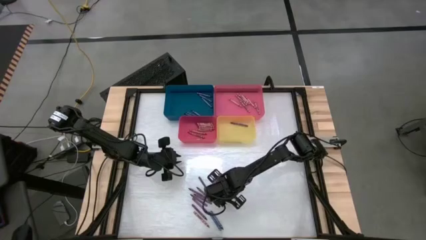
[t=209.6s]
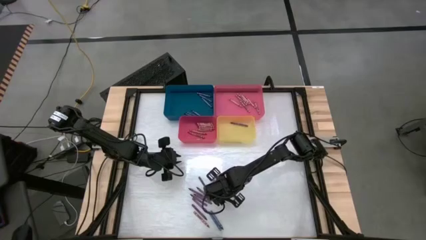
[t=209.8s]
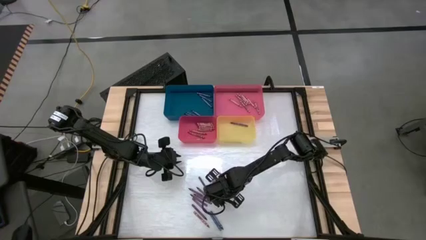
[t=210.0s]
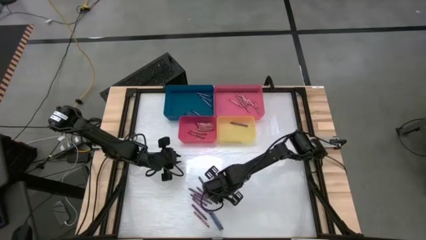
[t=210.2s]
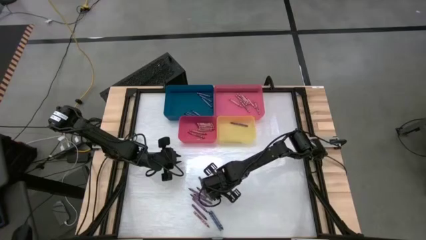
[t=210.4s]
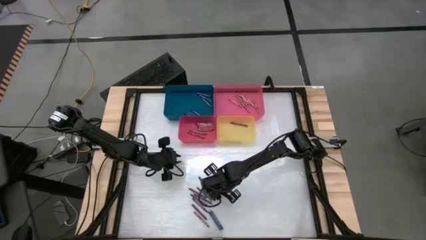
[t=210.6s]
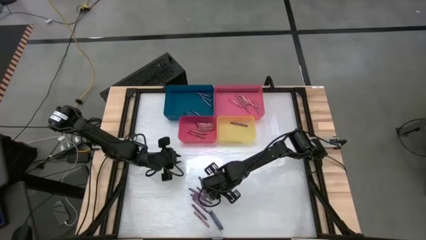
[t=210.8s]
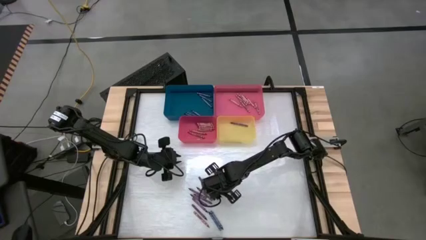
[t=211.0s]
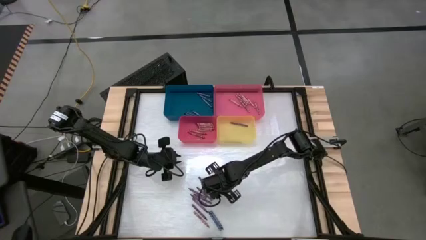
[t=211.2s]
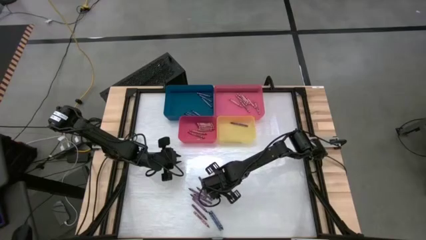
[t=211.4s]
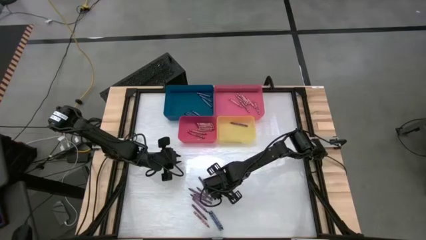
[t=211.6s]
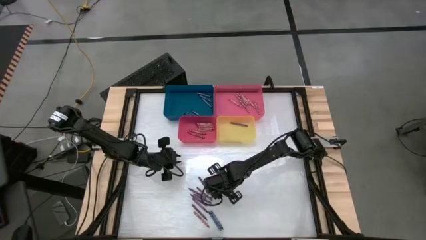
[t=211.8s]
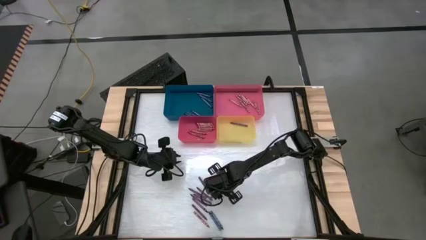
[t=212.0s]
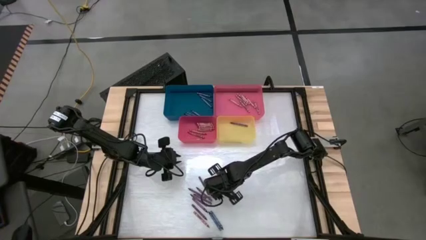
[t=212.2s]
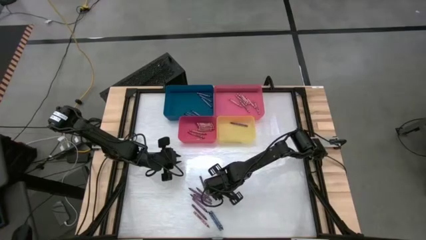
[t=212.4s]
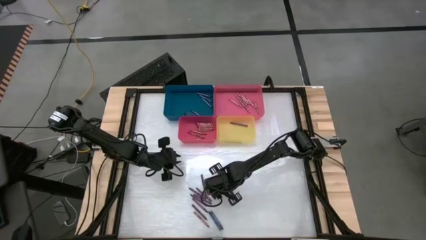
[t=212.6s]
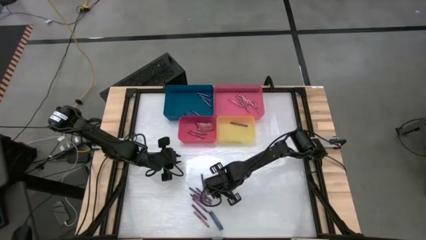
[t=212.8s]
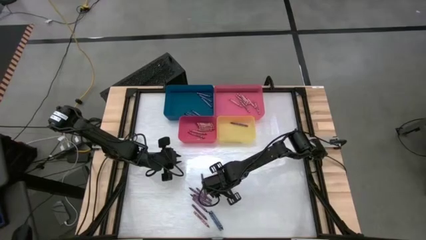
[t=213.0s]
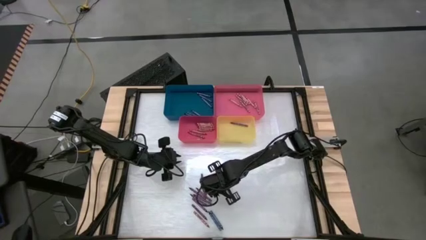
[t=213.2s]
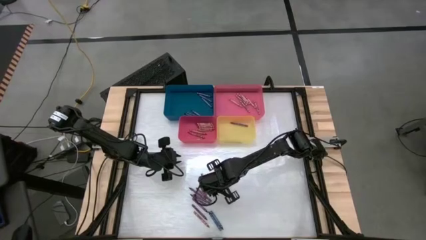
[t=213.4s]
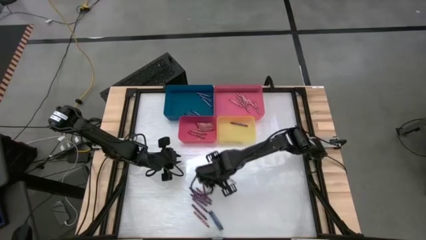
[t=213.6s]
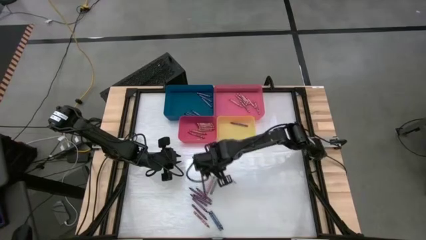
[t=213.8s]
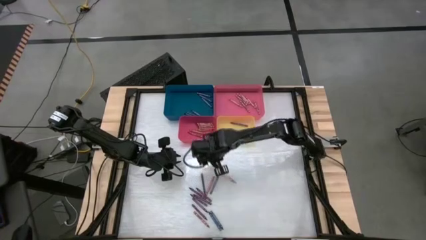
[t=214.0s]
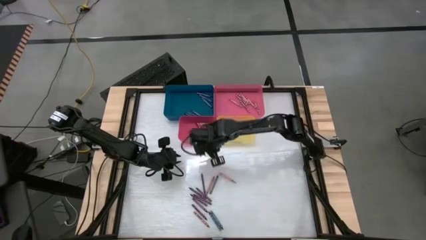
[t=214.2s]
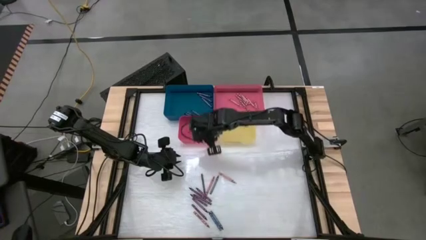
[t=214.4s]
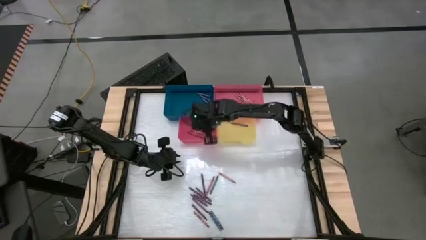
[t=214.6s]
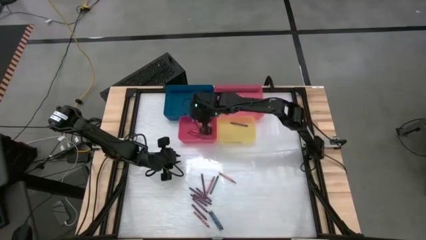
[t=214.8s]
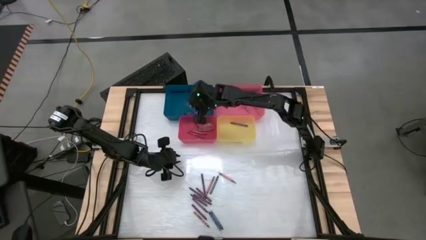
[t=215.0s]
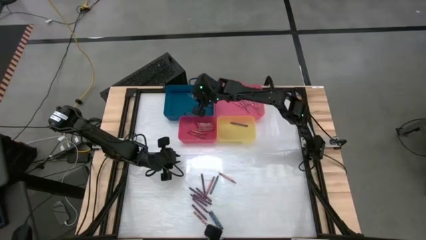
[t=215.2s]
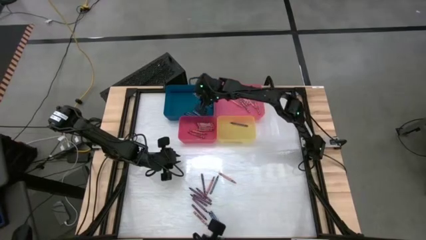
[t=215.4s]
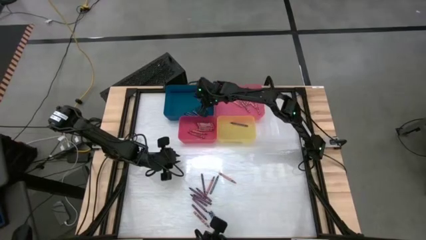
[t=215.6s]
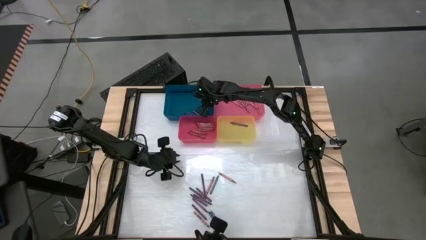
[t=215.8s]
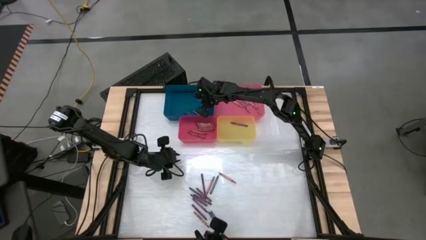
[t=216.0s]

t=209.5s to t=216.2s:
Task: Sort crayons
Put the blue crayon into the blue bin

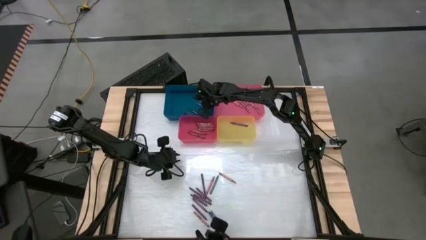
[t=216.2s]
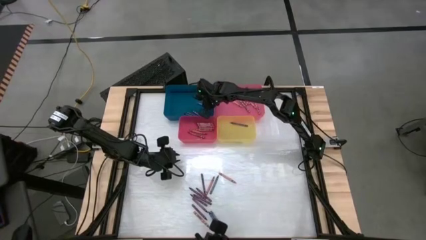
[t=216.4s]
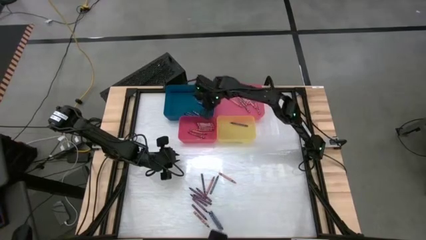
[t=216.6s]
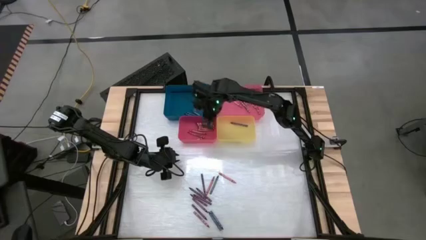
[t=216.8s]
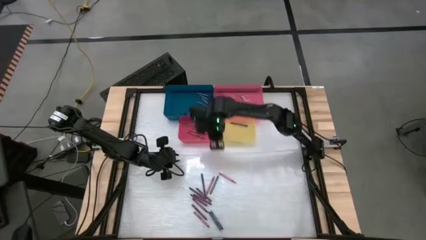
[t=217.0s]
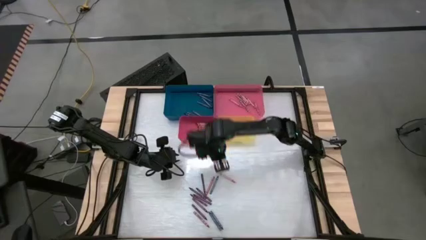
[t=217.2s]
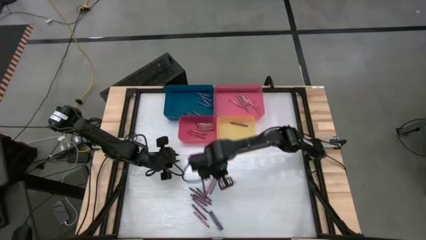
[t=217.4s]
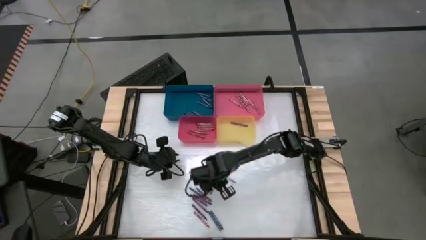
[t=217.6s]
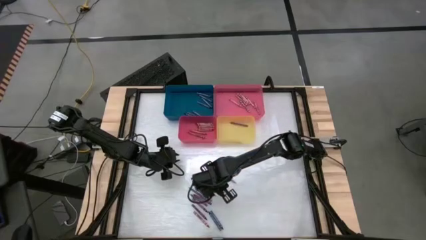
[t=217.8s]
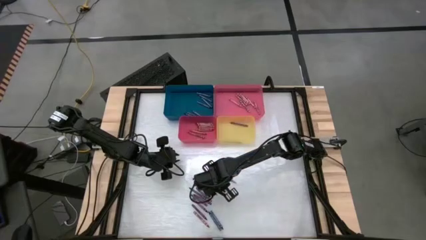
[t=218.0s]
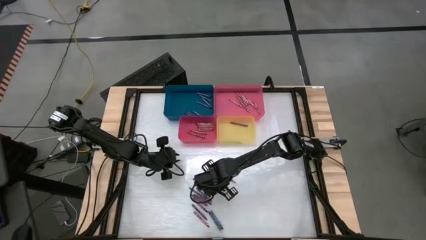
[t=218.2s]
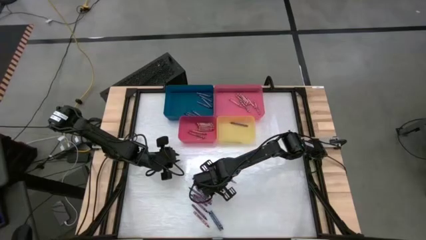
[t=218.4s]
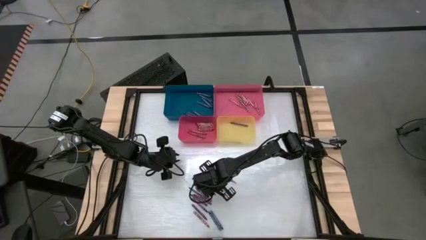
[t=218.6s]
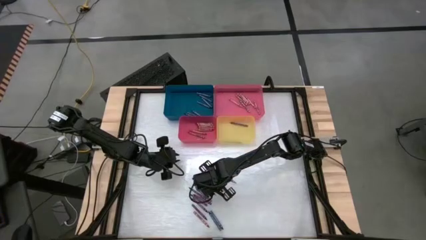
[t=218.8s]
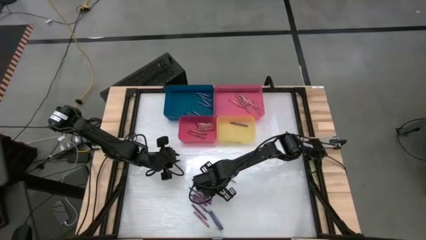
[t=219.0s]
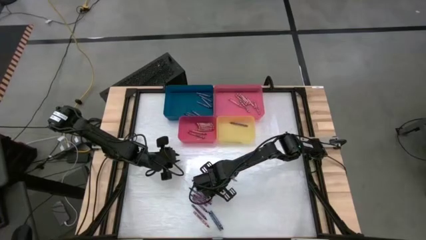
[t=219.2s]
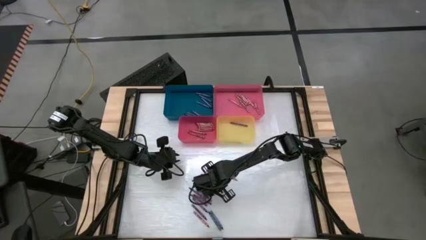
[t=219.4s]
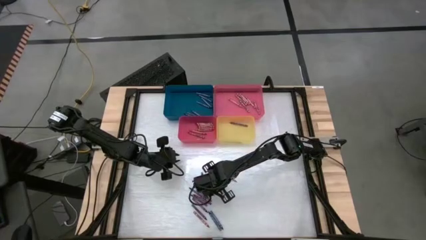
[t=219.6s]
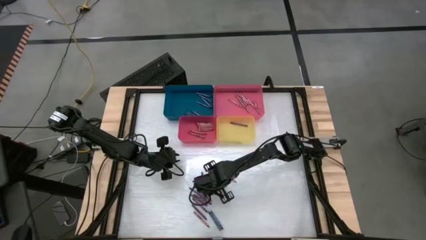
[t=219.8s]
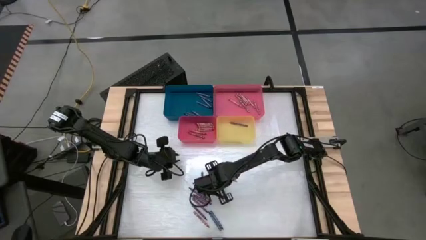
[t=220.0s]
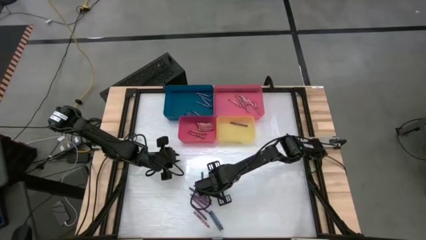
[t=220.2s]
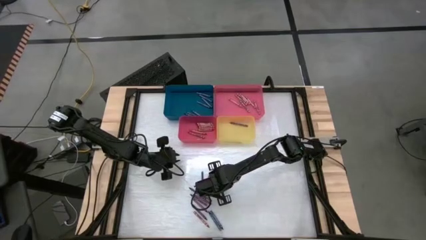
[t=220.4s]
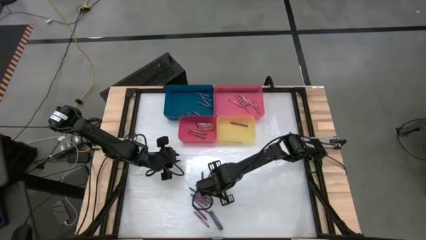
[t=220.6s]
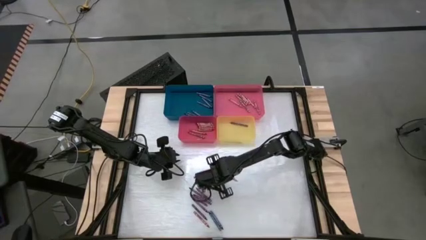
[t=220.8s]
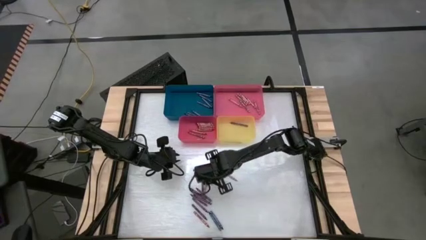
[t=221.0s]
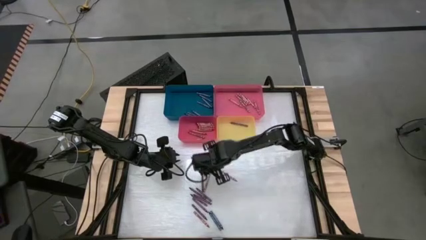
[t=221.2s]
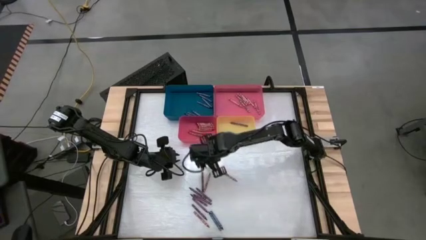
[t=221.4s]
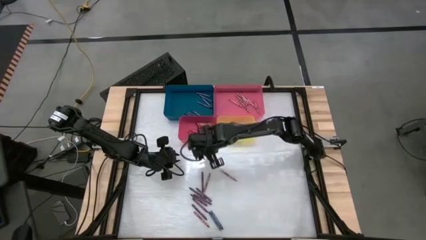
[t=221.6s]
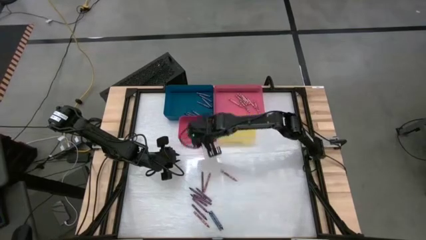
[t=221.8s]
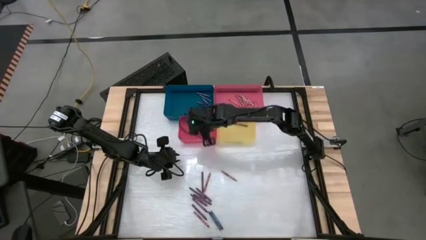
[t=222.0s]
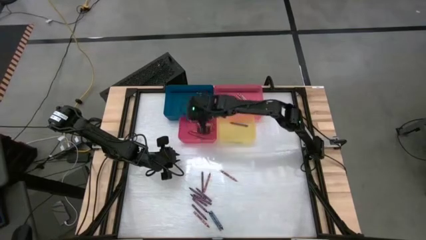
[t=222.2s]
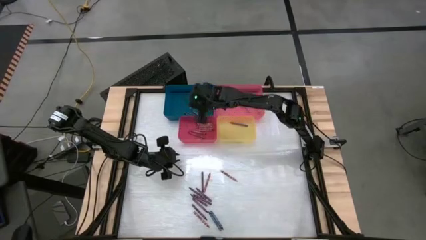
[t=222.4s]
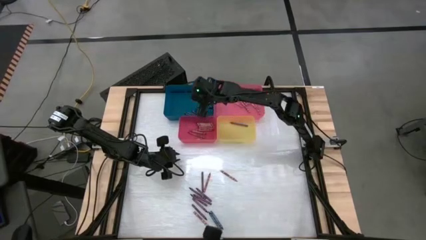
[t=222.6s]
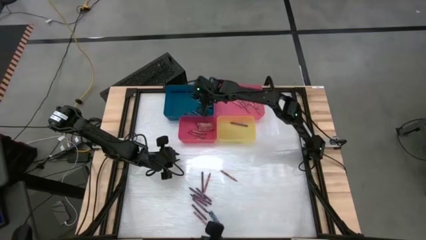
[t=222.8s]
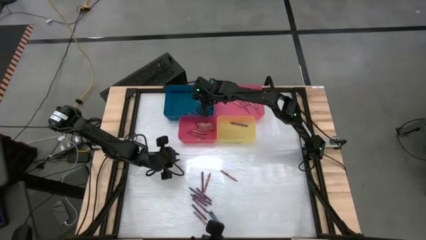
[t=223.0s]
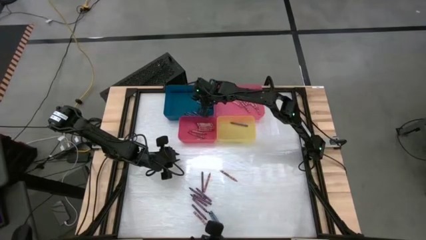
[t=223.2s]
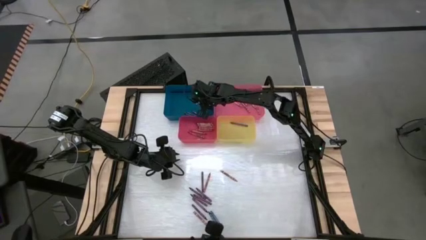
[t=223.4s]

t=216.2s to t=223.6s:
Put the blue crayon into the blue bin
